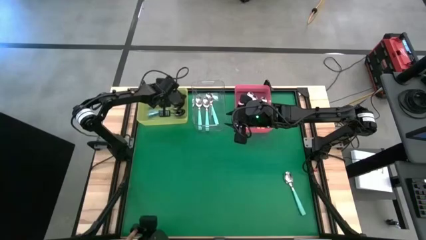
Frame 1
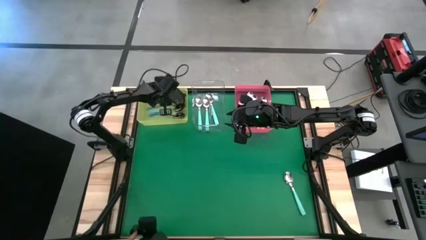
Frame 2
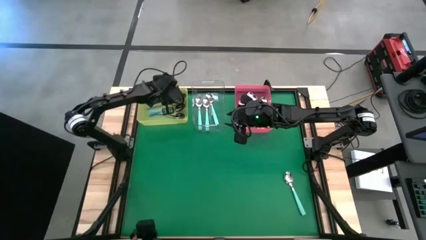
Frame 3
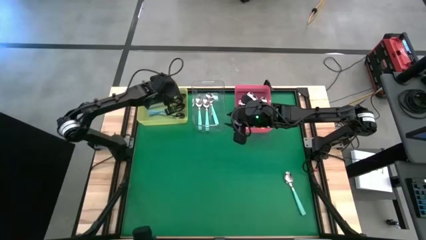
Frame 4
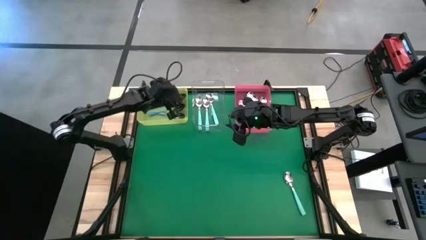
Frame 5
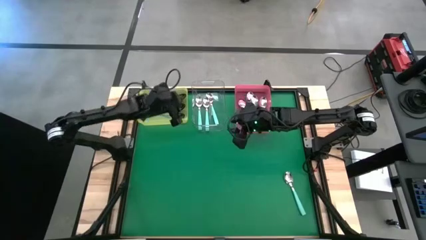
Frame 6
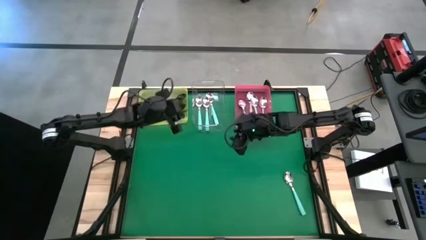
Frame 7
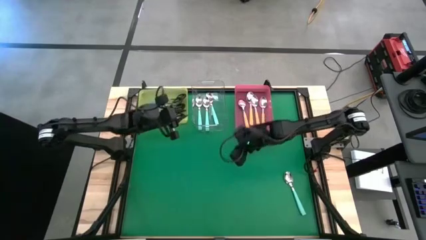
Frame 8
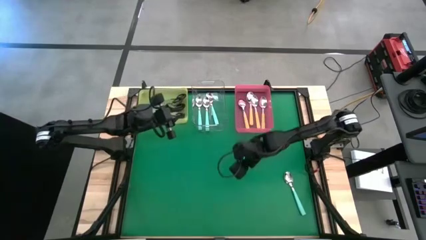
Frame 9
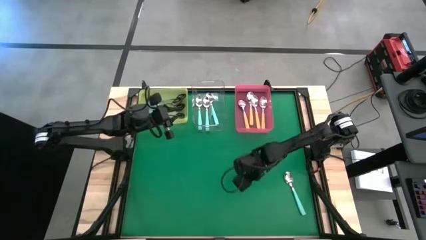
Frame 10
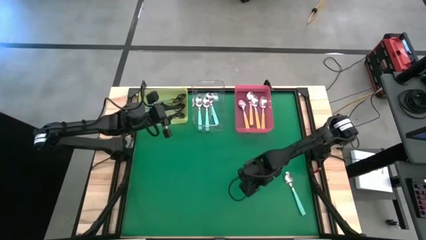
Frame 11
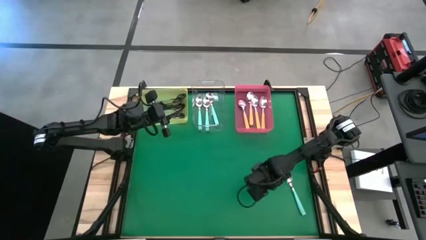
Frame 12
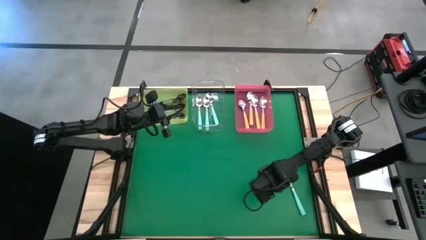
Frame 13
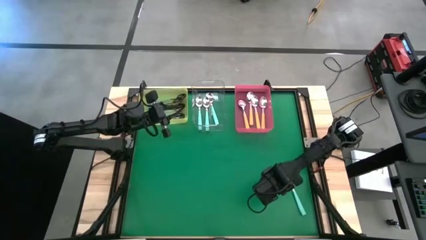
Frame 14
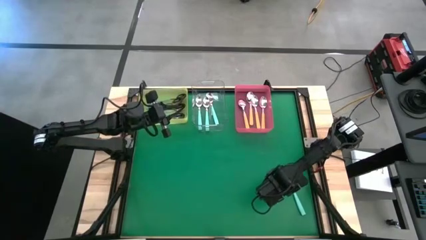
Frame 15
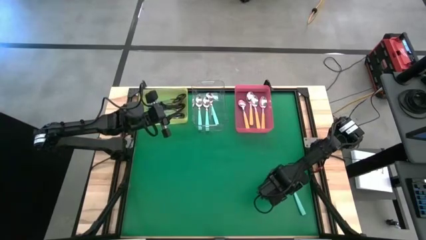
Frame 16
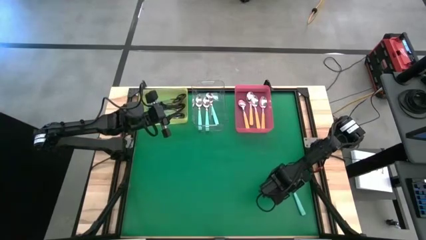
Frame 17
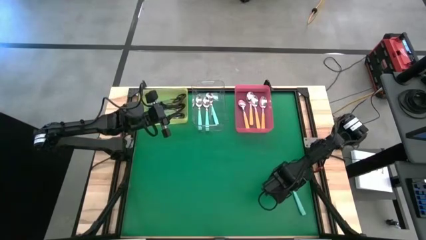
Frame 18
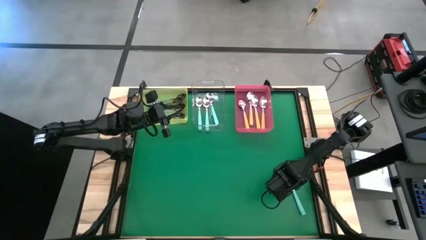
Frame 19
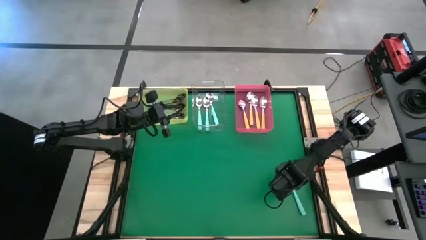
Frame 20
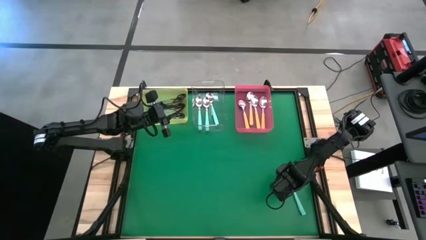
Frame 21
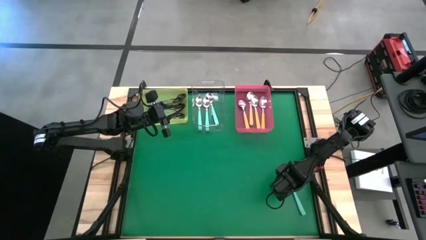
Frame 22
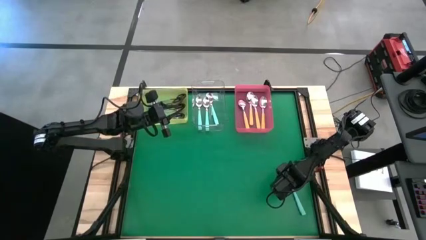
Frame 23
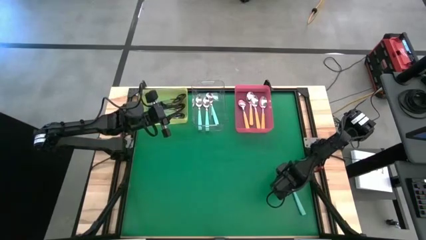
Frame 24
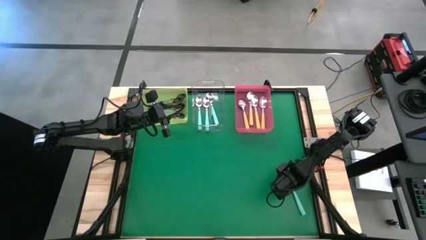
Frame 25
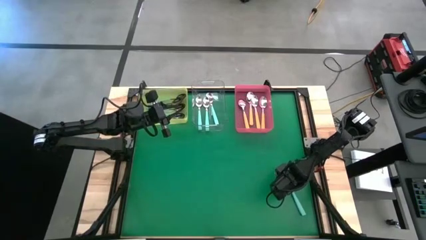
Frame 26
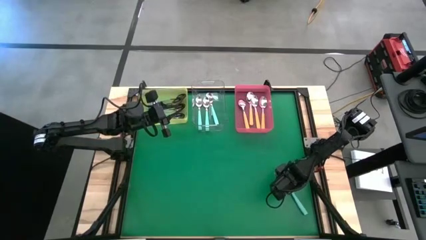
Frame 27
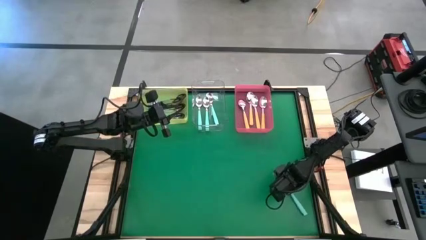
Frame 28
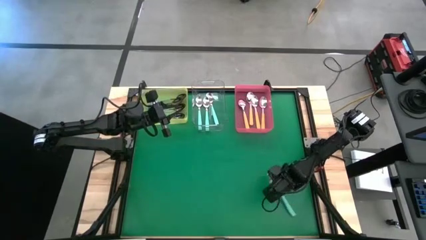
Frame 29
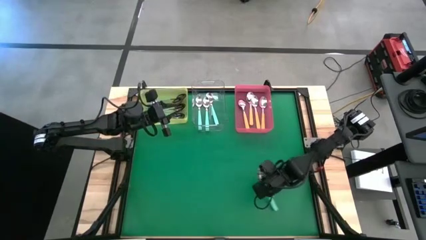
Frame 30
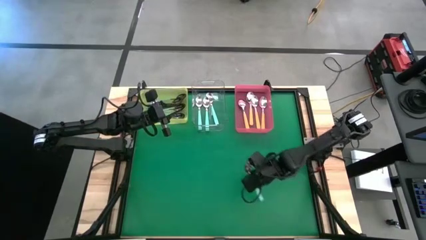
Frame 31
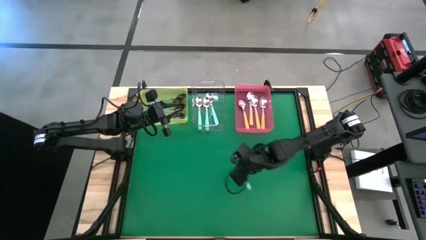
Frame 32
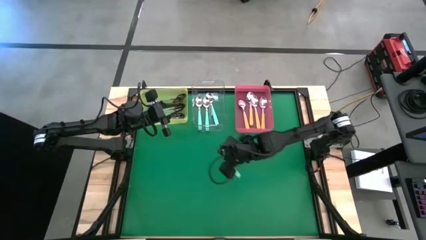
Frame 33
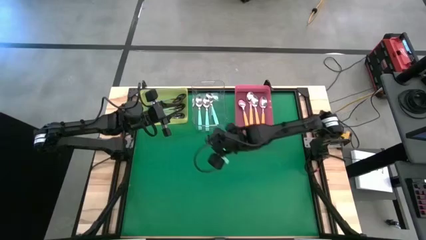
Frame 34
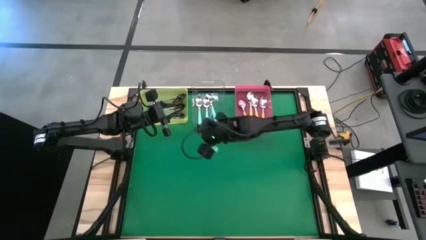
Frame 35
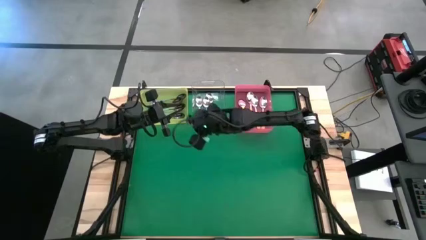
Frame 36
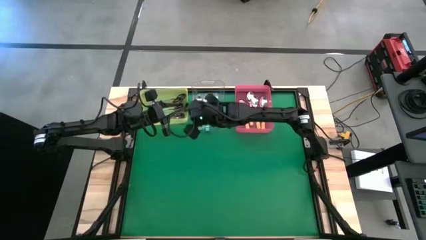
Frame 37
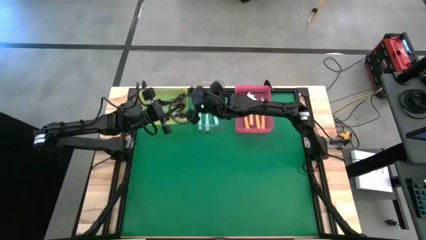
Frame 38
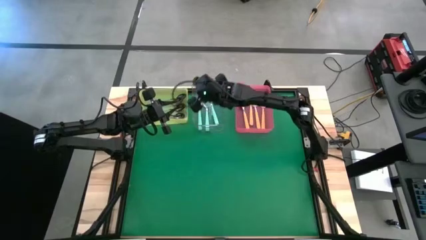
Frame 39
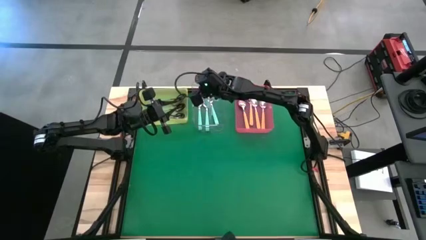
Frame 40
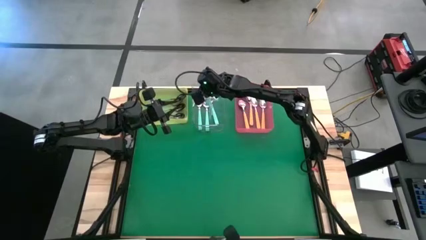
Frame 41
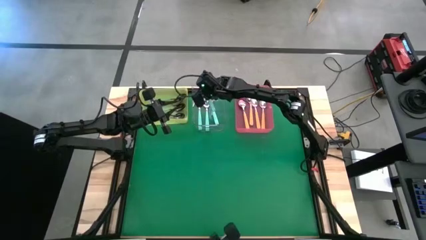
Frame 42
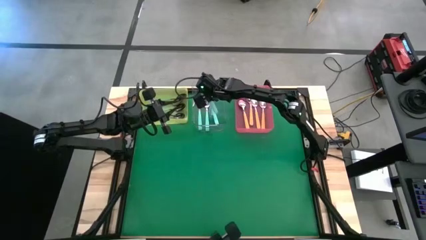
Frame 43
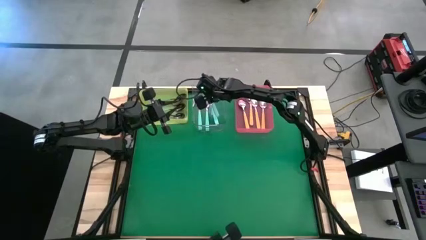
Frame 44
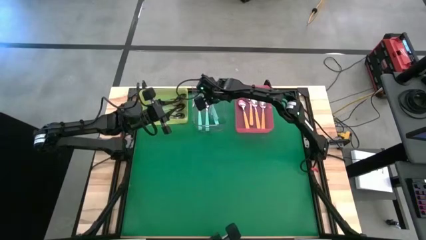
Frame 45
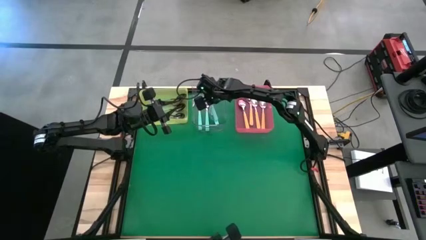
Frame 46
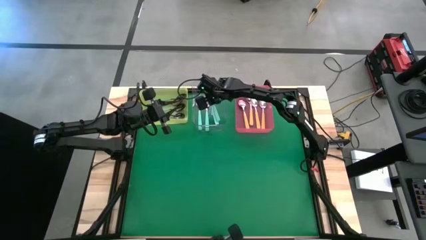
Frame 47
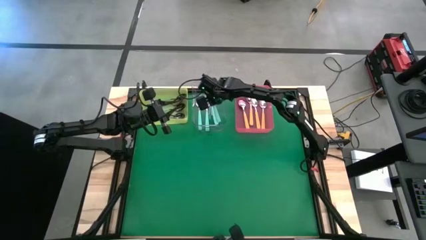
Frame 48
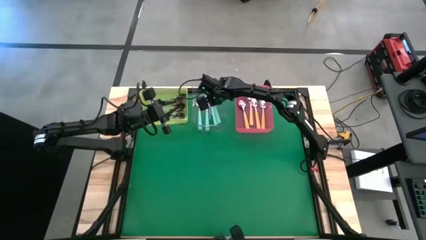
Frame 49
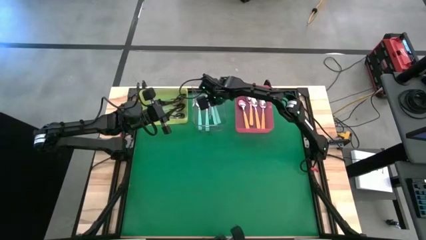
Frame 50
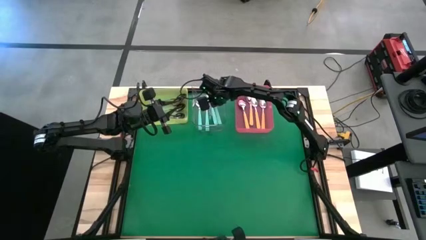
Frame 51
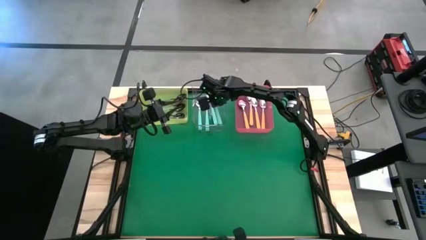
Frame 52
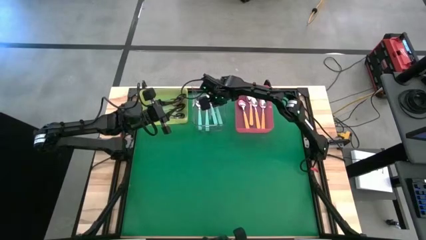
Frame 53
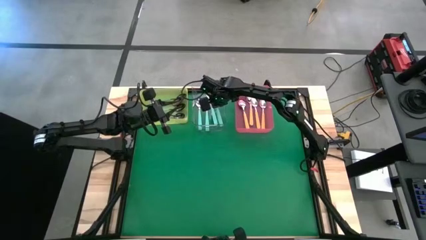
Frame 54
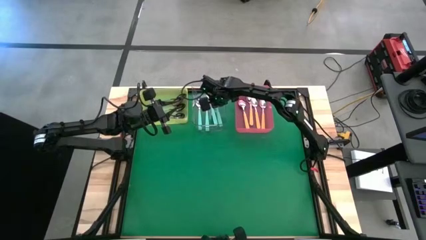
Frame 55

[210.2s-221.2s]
Task: Sort silverware by color (type)
Put the green spoon into the transparent bin
